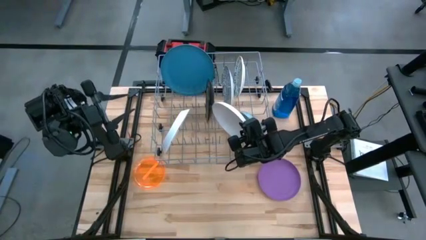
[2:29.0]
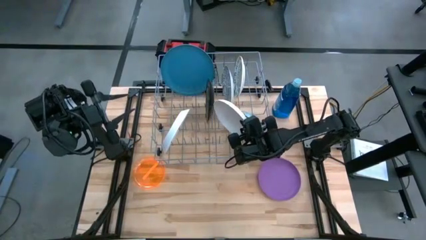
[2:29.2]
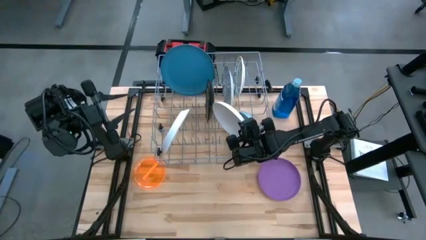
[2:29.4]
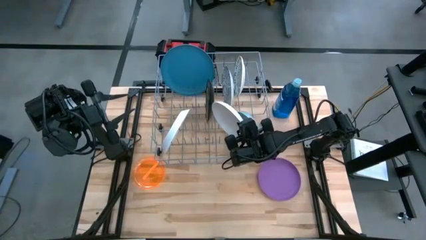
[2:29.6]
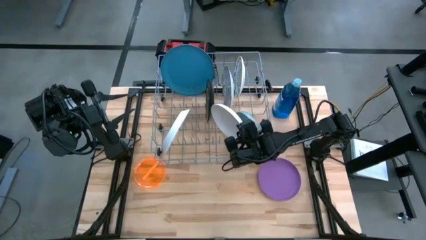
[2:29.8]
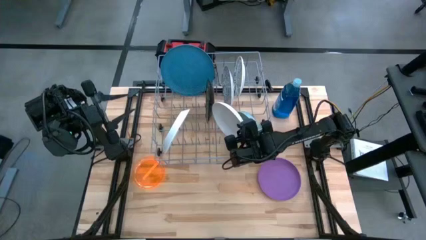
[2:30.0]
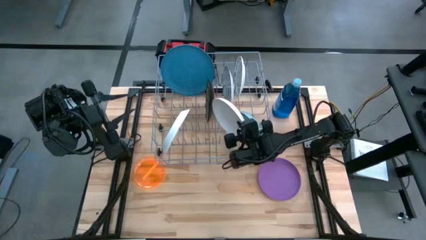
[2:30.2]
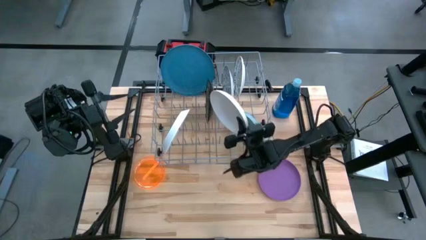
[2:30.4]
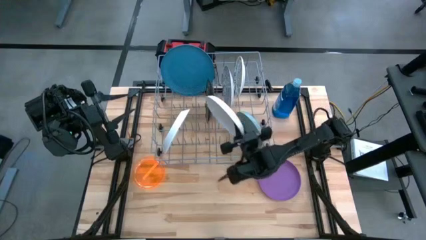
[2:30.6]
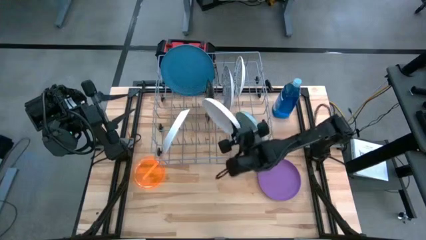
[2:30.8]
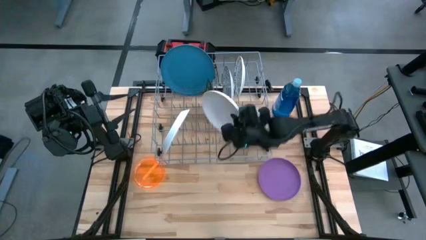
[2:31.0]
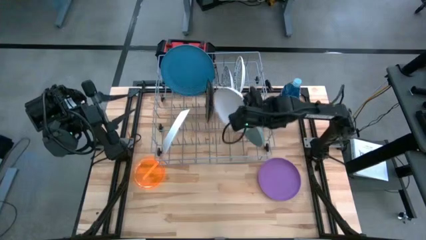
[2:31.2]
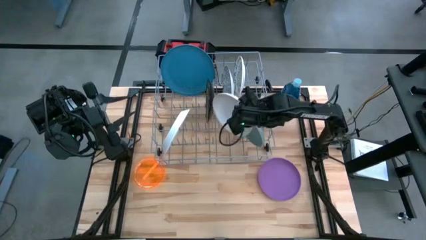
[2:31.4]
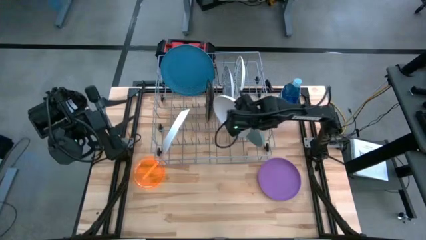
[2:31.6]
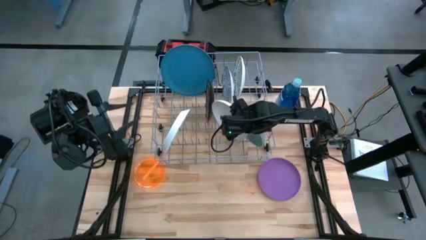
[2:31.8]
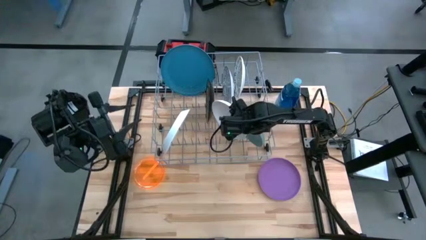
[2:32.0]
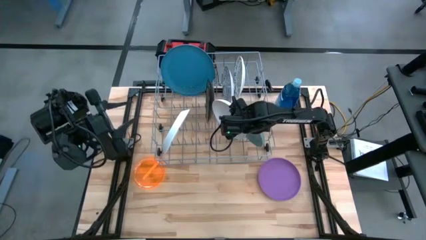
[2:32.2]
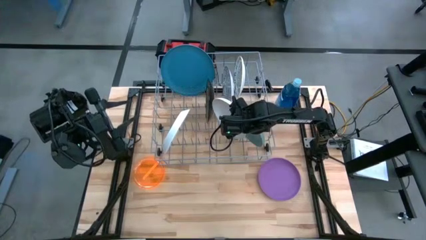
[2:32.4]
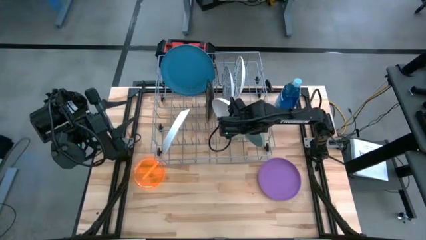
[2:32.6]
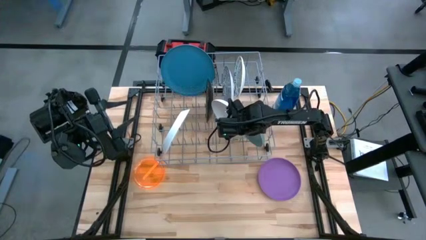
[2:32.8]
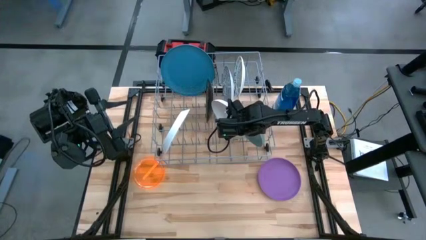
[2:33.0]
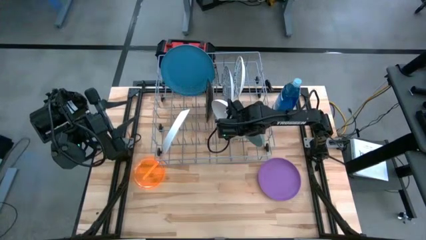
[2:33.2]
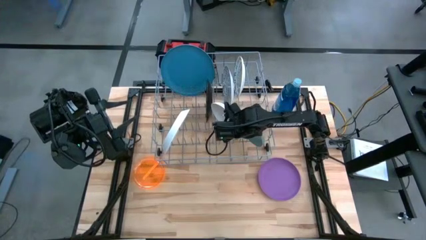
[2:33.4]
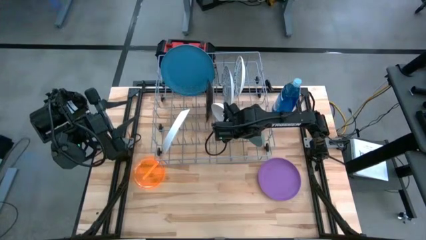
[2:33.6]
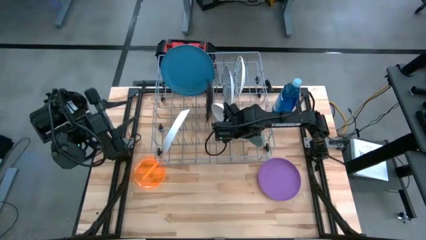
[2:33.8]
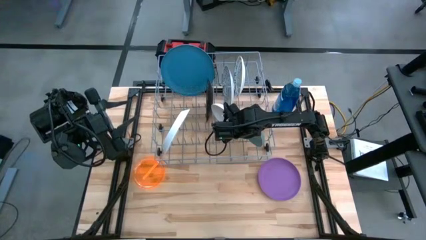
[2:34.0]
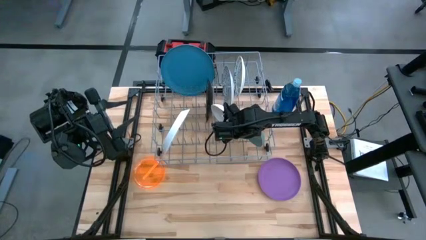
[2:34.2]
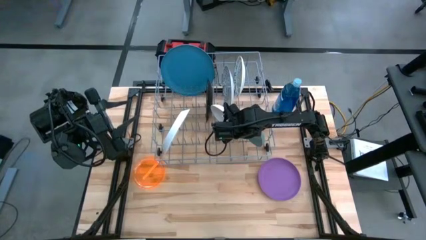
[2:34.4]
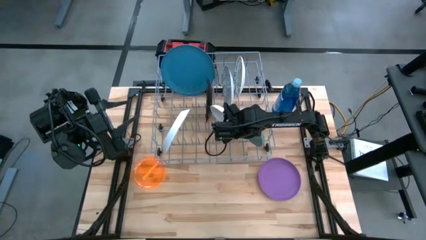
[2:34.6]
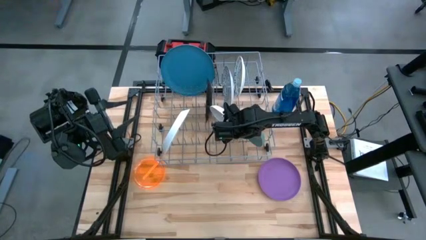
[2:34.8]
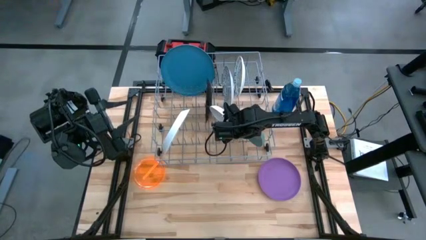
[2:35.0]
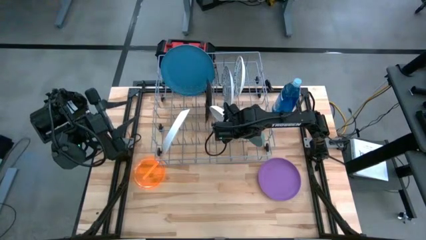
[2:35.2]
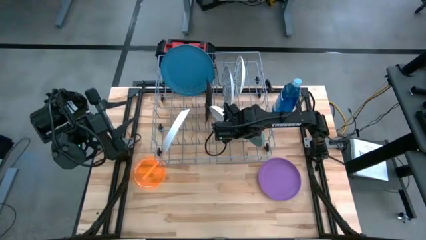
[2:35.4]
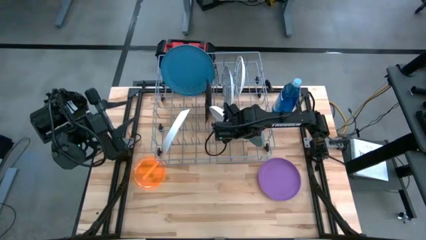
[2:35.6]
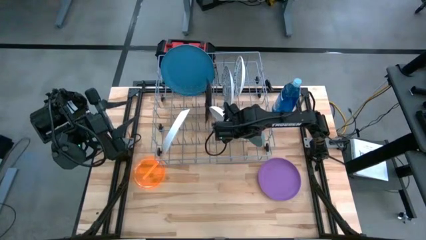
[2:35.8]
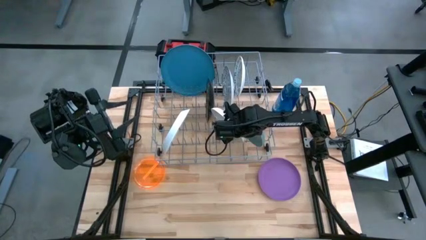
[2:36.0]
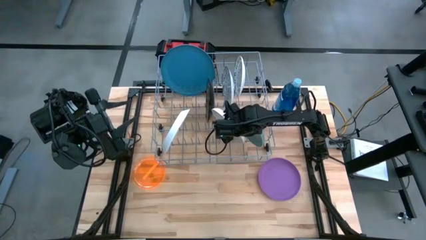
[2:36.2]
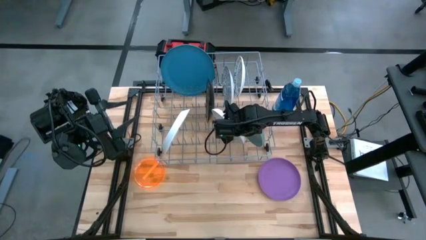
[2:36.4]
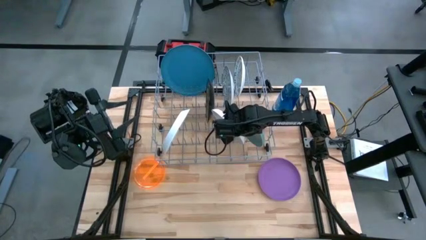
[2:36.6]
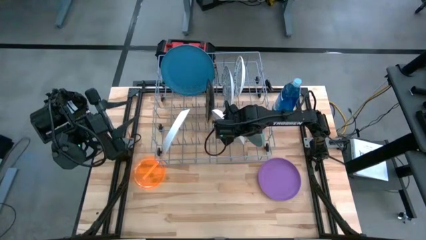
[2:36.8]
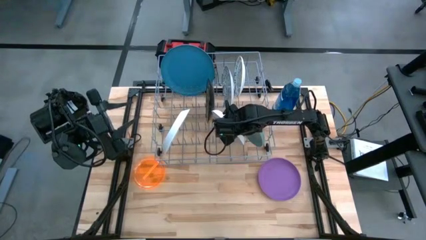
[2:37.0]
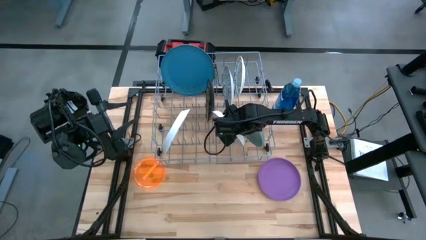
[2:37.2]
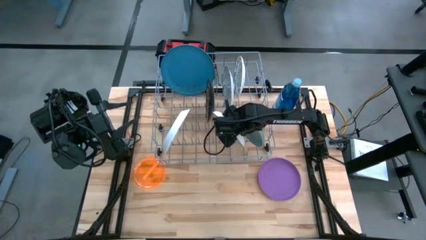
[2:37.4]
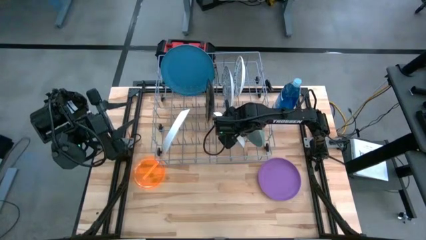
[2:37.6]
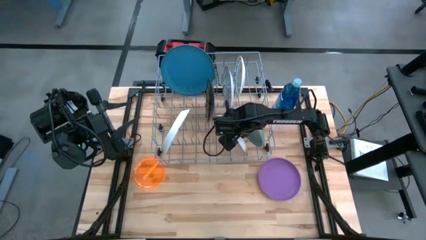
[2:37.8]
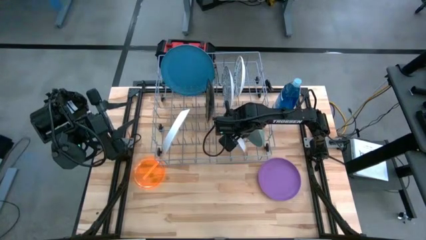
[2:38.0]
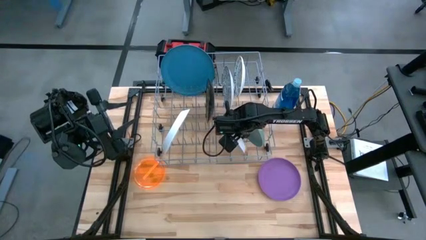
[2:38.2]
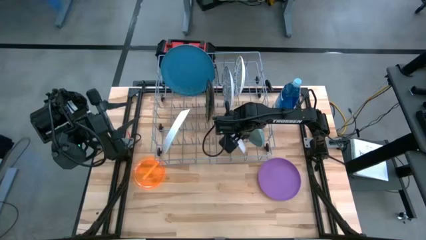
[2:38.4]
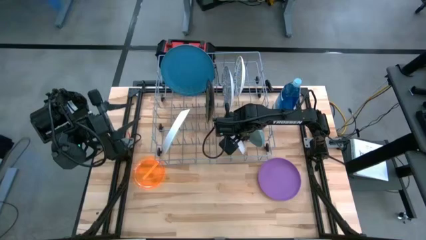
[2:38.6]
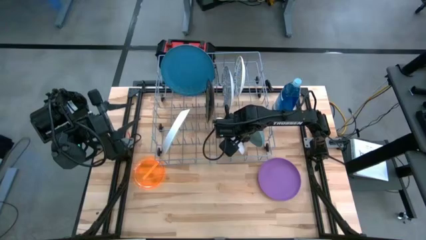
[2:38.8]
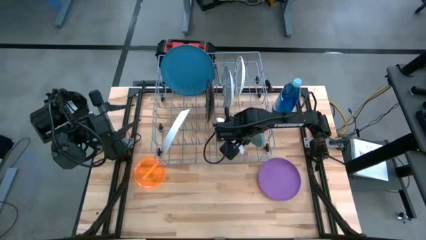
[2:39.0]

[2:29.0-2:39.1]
Task: Sort dishes
Put the white plate in the dish rack

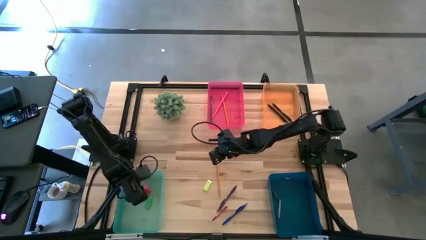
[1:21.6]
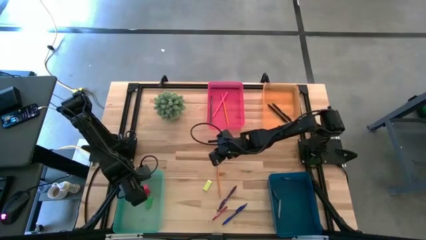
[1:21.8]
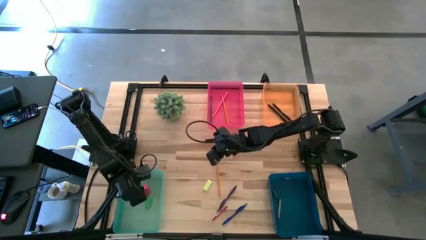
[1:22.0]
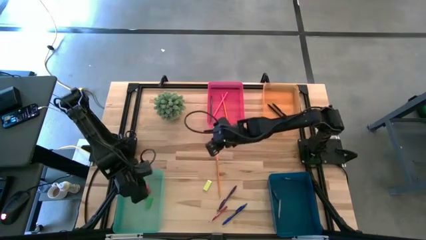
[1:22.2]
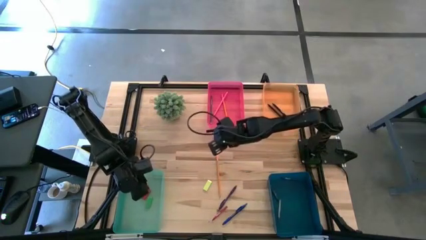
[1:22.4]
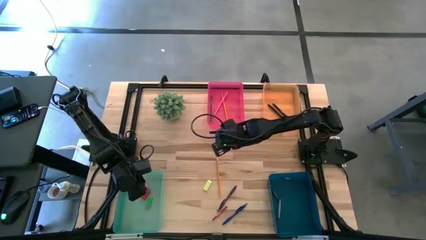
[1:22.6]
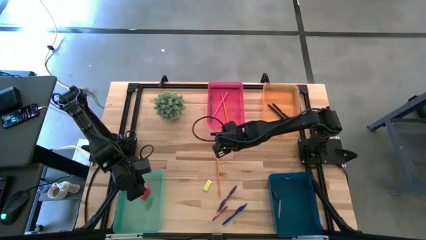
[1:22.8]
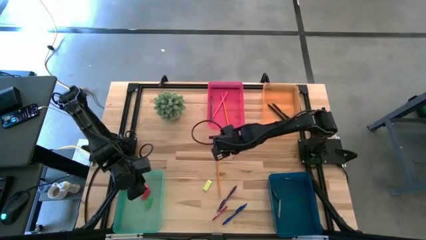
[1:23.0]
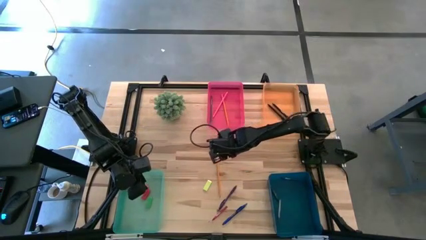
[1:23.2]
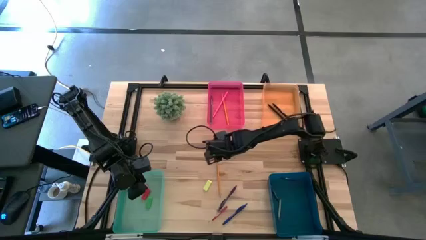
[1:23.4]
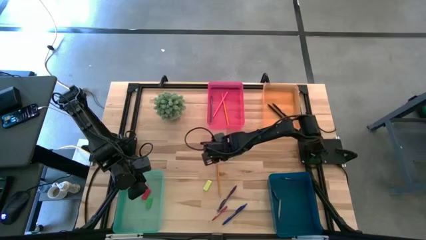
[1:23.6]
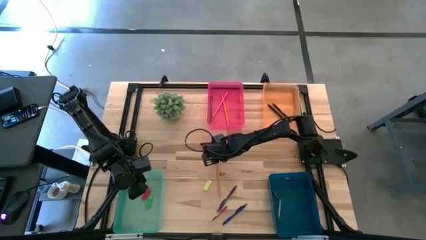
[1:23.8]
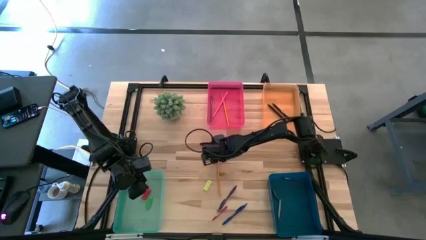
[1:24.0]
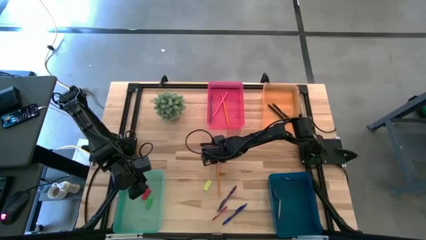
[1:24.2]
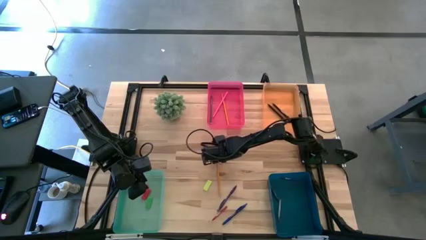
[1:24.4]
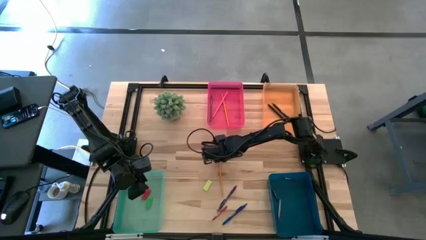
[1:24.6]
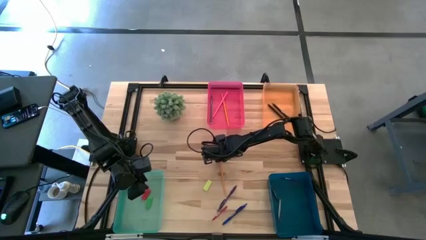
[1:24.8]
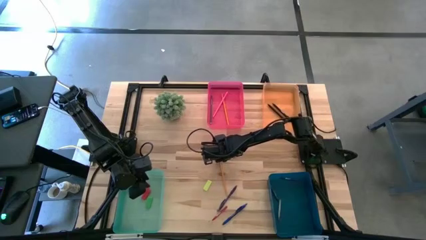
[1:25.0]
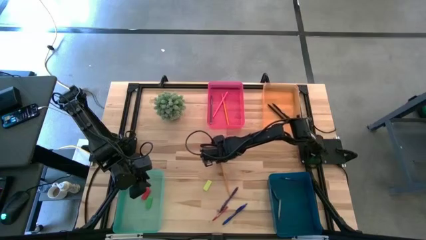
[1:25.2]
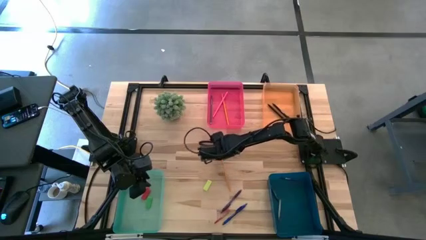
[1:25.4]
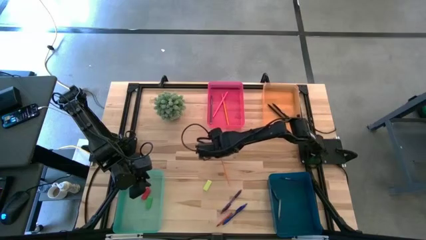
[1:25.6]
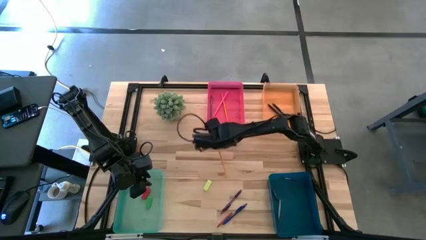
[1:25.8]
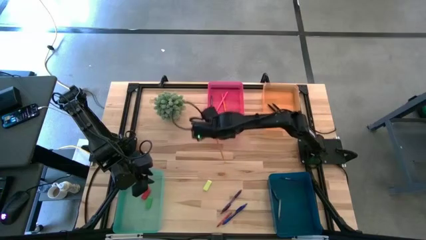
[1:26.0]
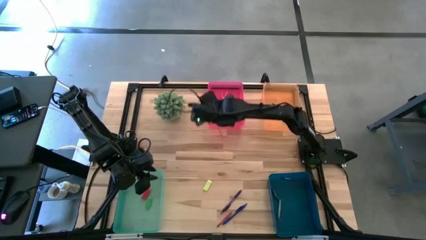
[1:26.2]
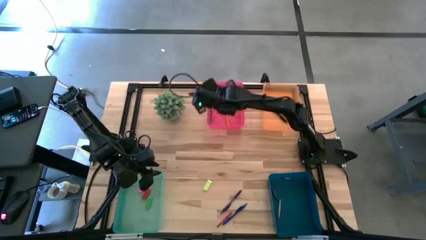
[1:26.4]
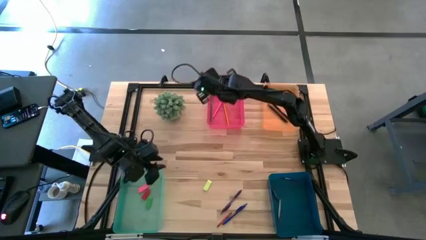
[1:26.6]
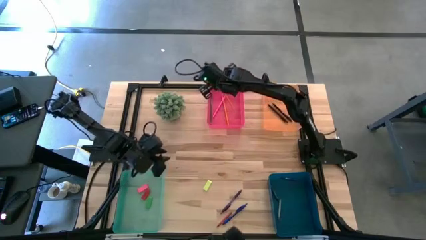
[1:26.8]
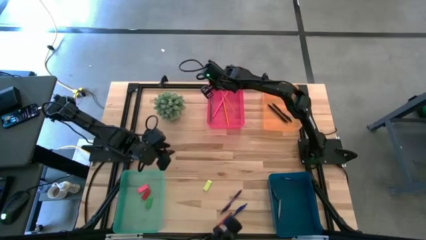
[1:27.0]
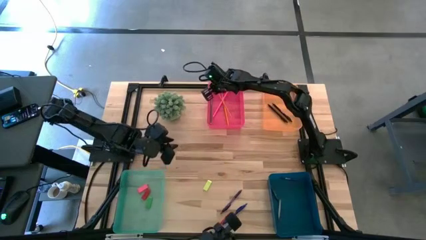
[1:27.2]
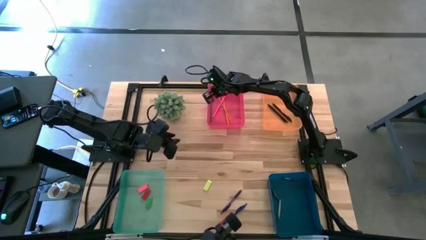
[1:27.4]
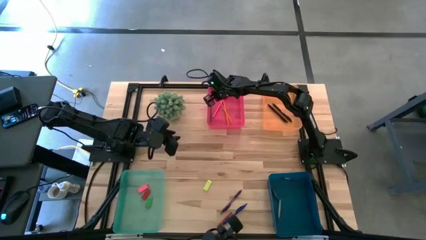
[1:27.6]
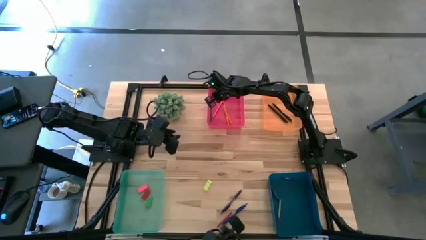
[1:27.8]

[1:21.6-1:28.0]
Task: Sort crayons/erasers/pens/pencils in bins
Put the yellow pencil into the pink bin
